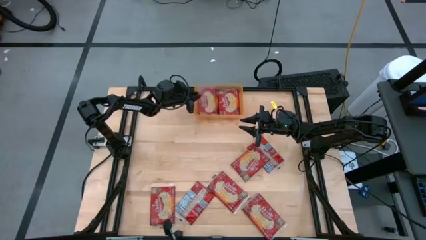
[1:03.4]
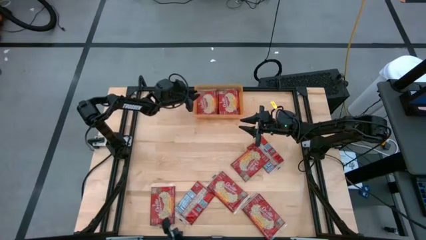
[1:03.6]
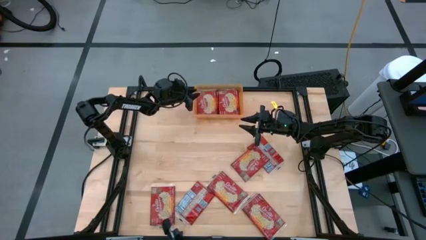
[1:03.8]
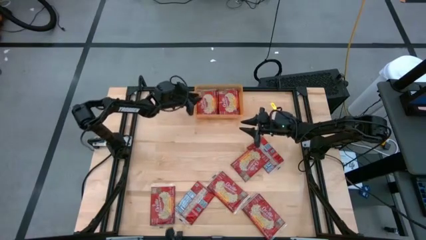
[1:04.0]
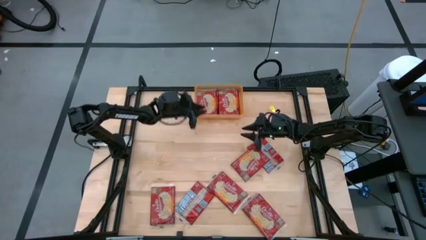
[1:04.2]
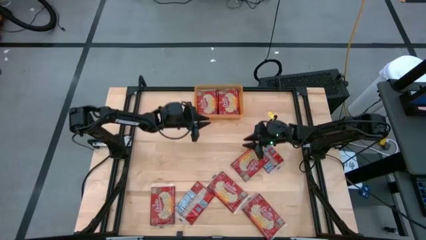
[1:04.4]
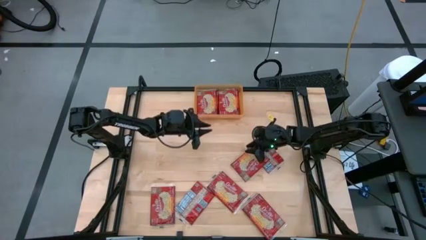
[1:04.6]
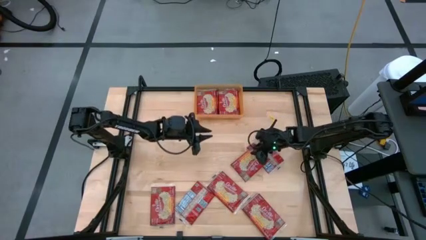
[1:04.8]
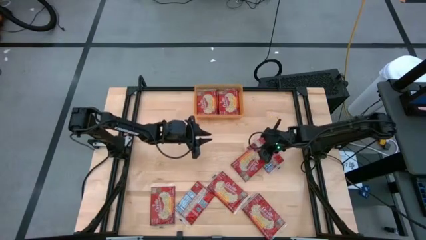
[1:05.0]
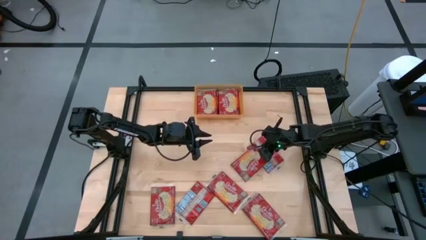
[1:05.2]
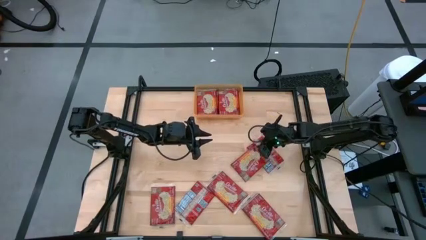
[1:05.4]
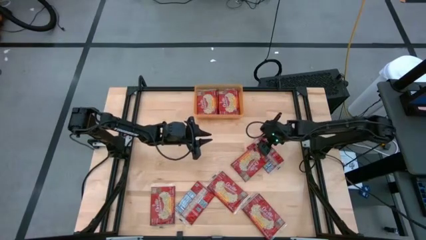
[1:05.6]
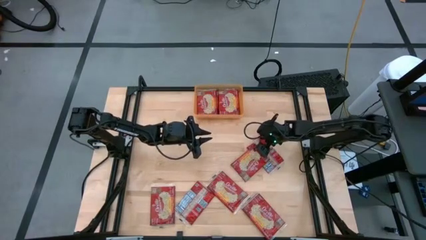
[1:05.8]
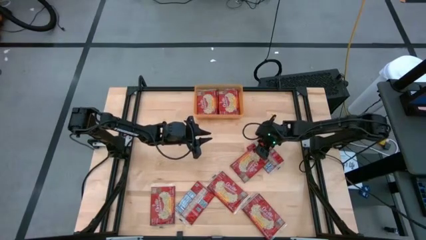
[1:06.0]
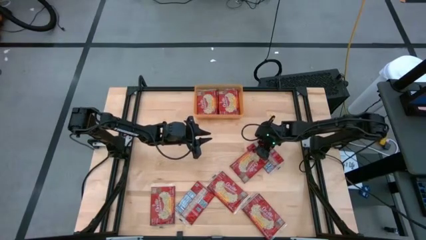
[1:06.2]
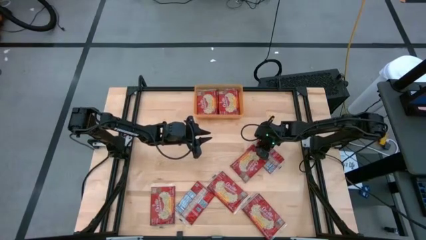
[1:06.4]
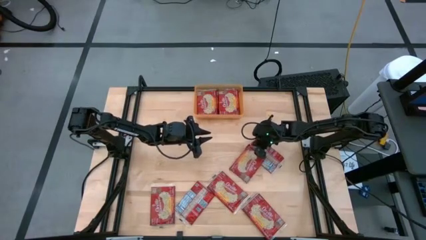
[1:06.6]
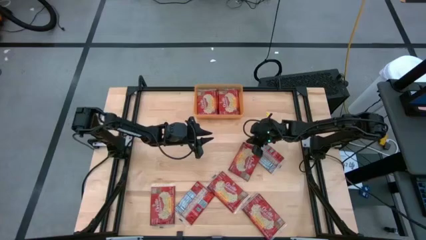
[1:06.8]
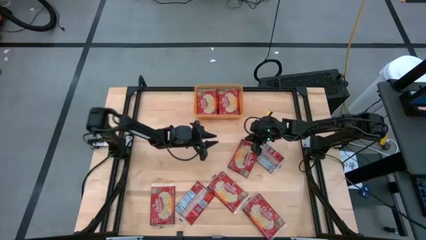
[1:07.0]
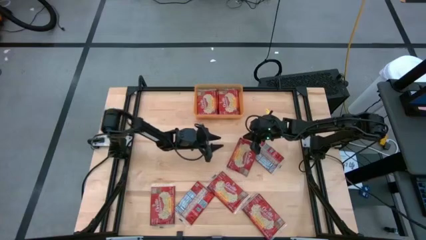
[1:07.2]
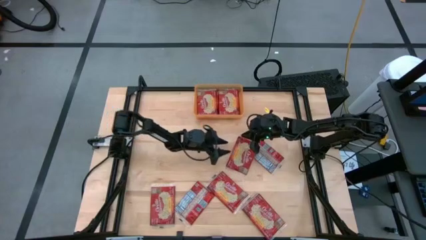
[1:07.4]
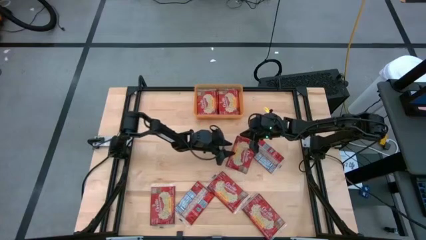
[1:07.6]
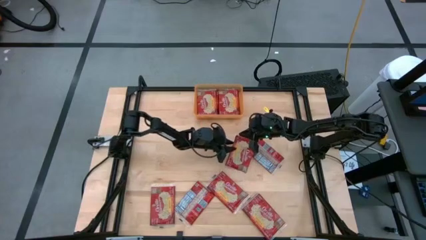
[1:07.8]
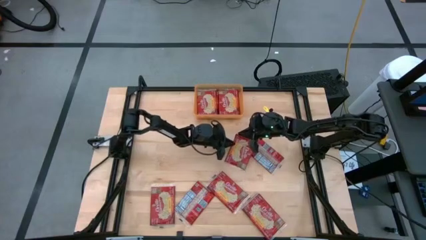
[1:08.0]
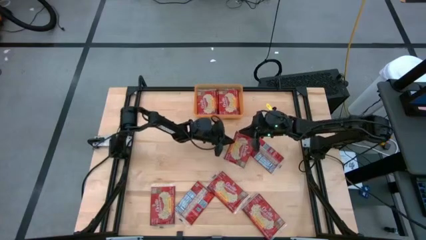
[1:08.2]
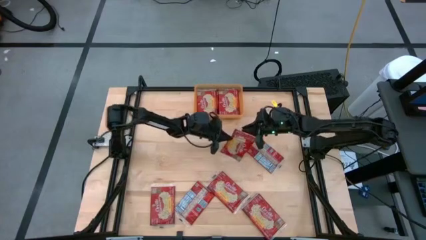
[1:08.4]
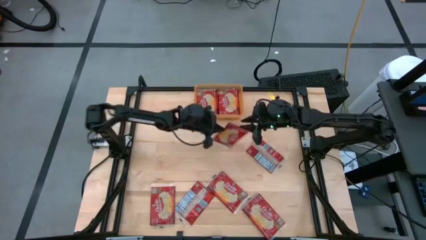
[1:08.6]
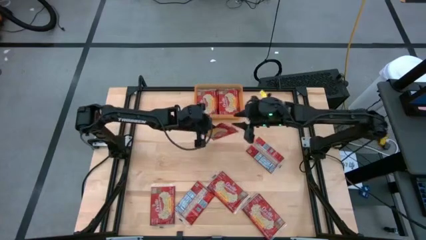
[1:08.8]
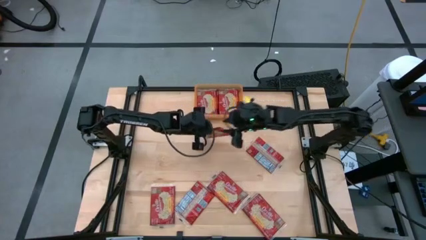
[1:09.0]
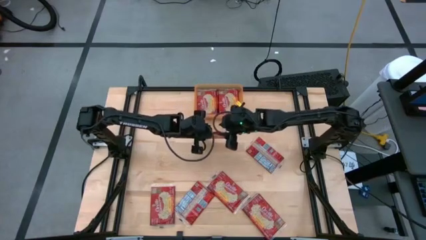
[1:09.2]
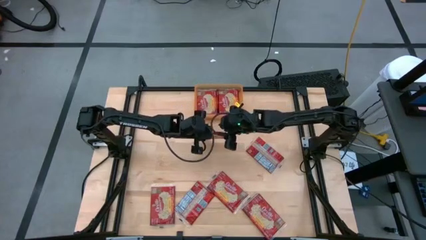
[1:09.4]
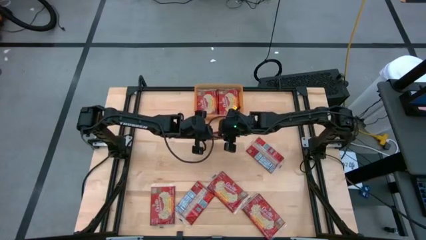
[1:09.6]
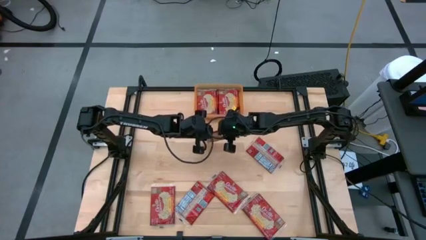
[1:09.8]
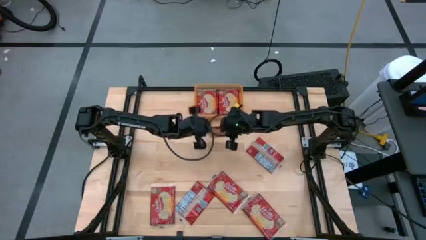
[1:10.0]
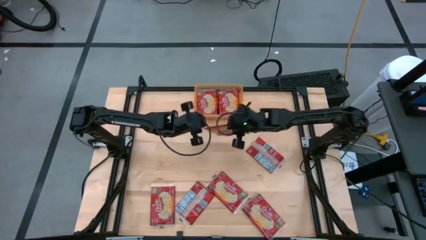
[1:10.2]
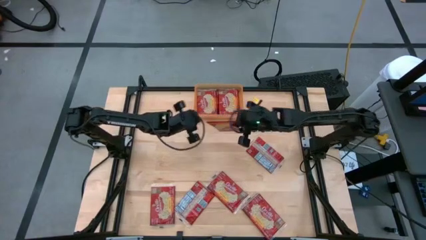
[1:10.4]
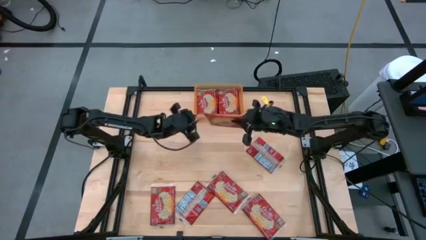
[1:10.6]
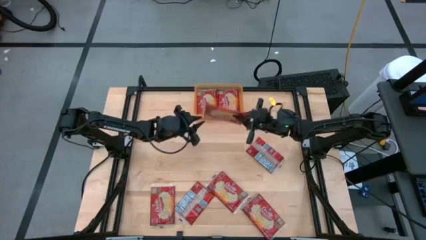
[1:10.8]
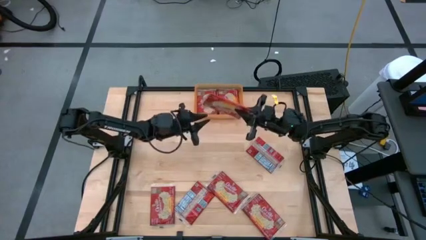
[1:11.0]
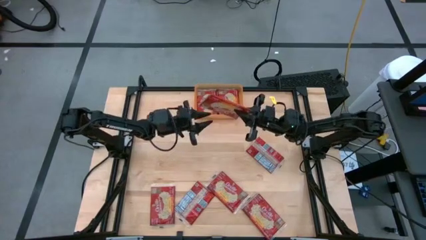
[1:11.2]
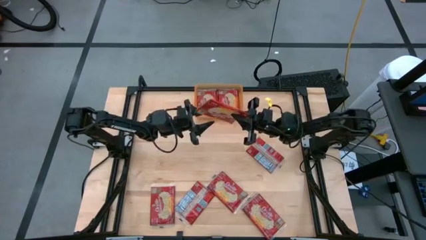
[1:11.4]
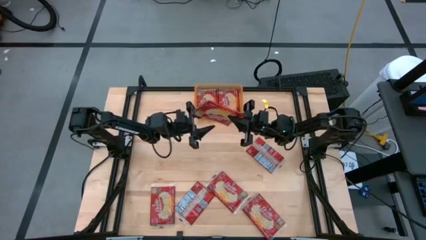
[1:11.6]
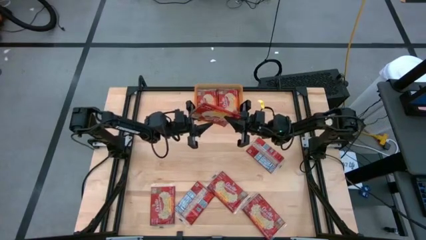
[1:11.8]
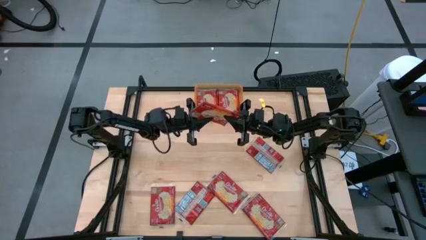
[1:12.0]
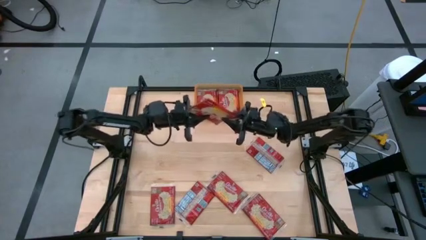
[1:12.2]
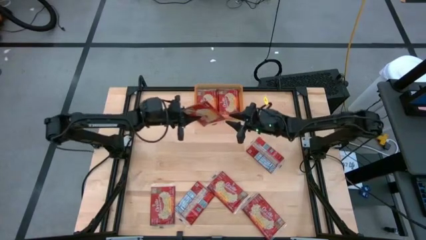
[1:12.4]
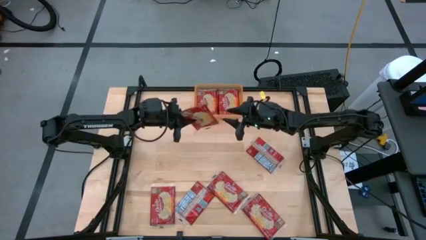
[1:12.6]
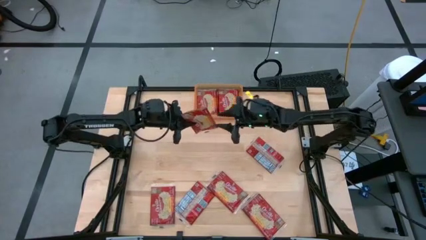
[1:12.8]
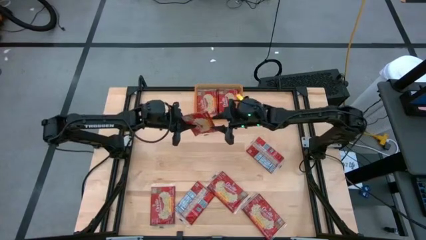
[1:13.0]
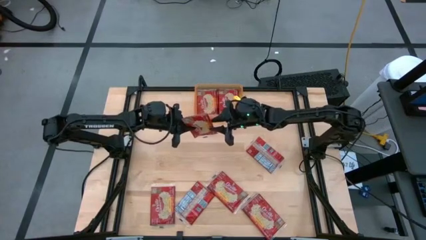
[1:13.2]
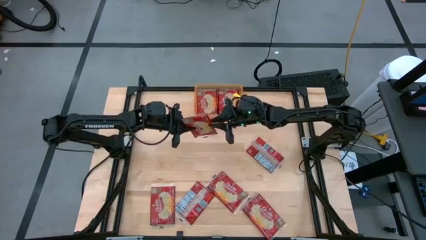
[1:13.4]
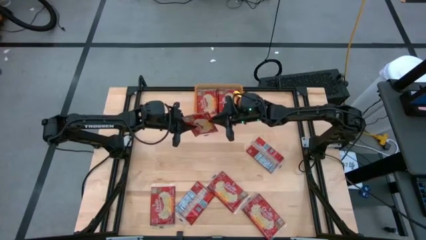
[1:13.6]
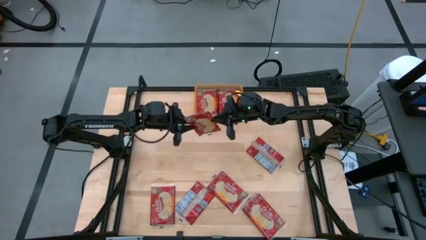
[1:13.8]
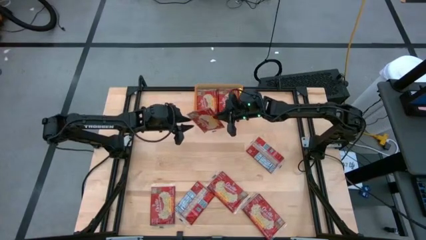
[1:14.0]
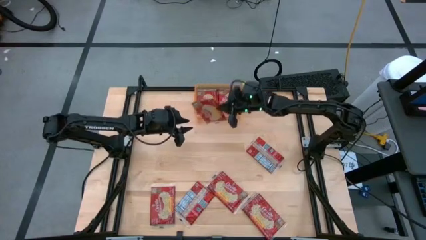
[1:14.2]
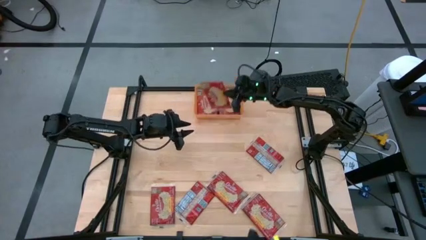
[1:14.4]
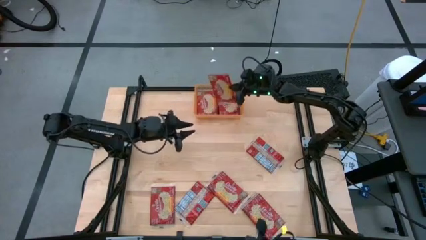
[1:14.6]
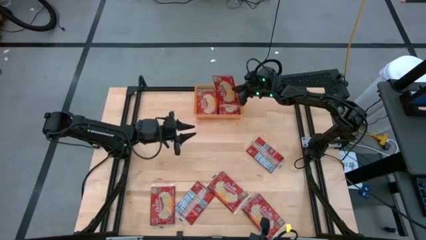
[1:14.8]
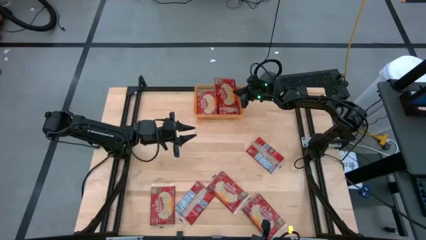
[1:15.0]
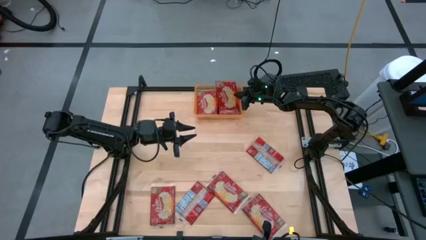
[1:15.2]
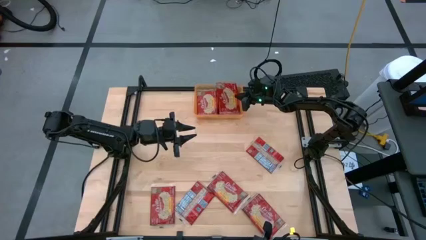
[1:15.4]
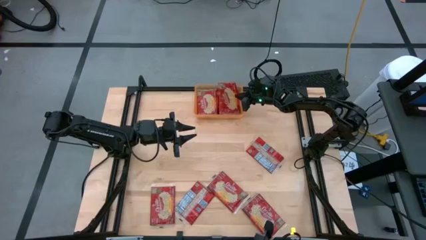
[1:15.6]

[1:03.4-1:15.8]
Task: Sort popcorn bags into baskets
Put the popcorn pack into the orange bin

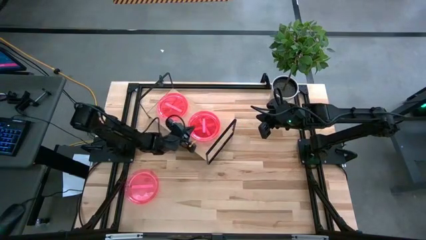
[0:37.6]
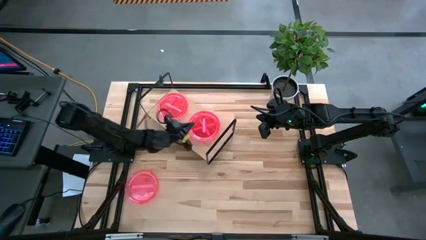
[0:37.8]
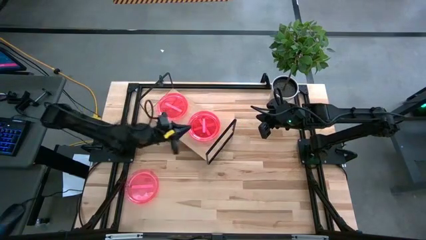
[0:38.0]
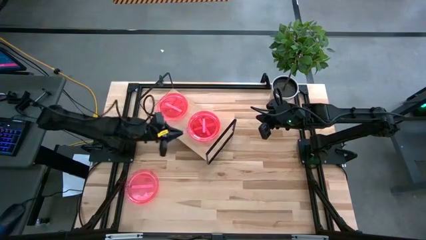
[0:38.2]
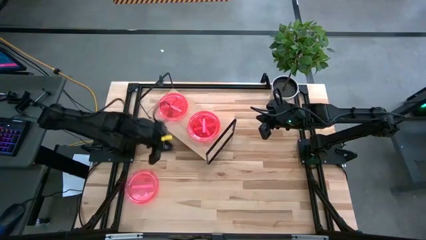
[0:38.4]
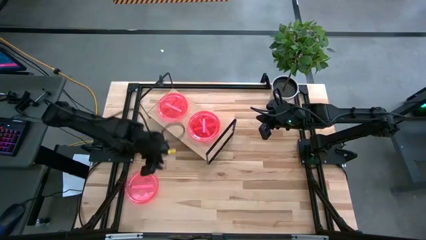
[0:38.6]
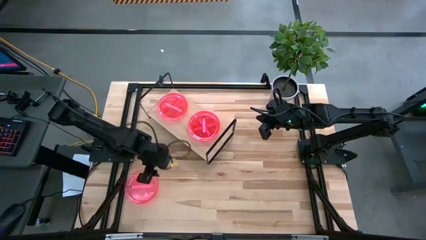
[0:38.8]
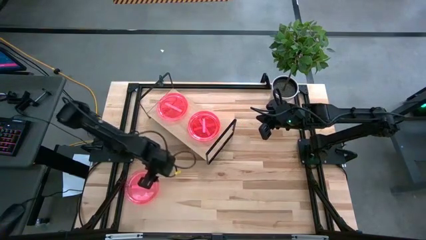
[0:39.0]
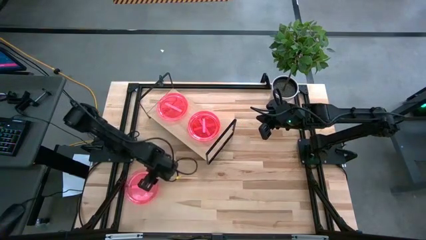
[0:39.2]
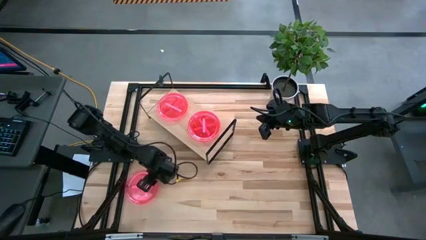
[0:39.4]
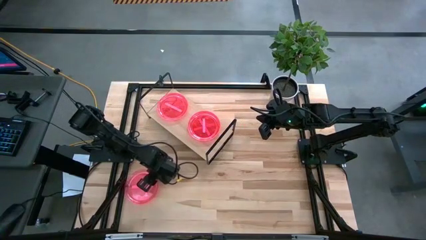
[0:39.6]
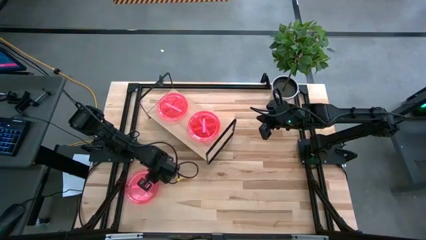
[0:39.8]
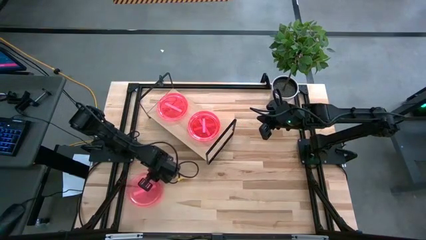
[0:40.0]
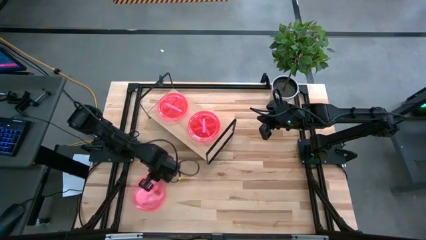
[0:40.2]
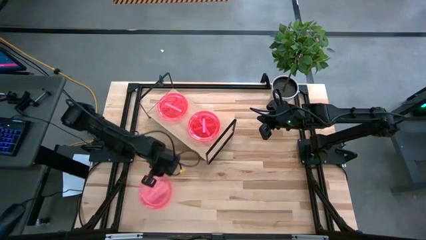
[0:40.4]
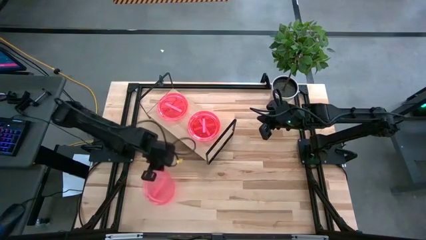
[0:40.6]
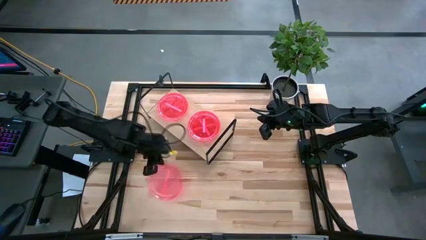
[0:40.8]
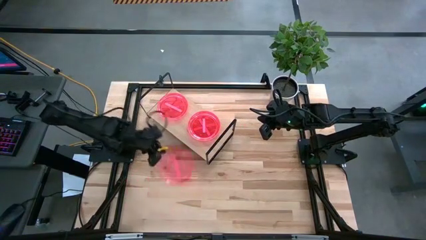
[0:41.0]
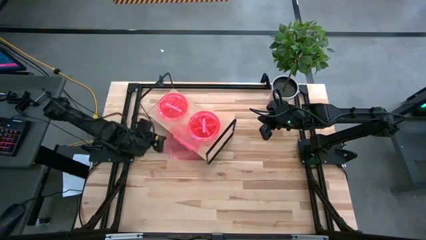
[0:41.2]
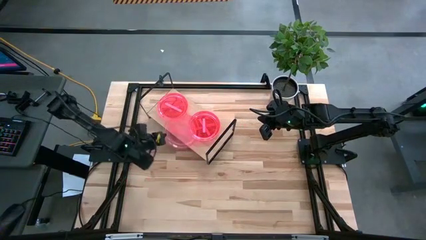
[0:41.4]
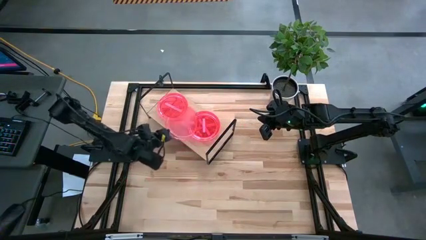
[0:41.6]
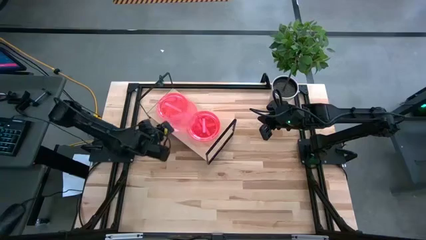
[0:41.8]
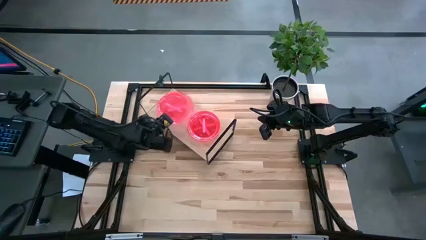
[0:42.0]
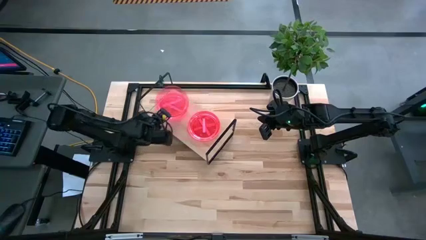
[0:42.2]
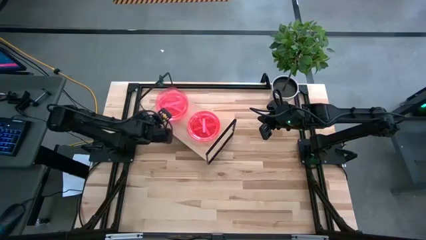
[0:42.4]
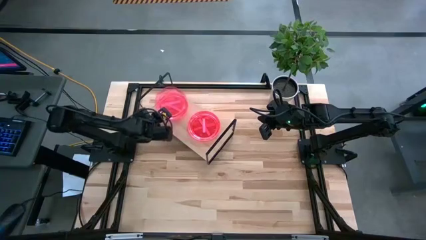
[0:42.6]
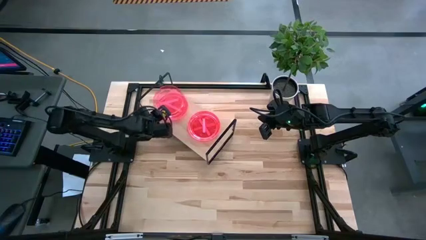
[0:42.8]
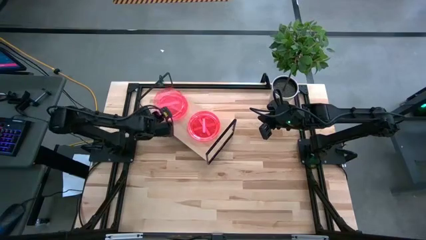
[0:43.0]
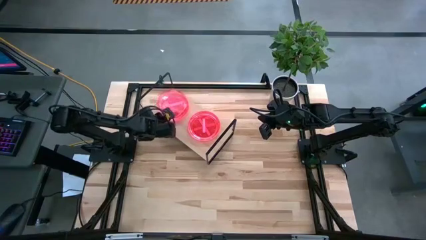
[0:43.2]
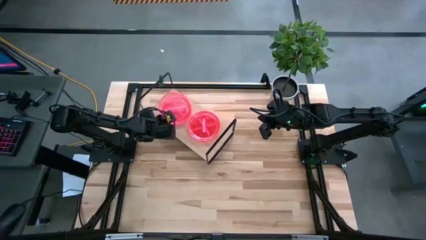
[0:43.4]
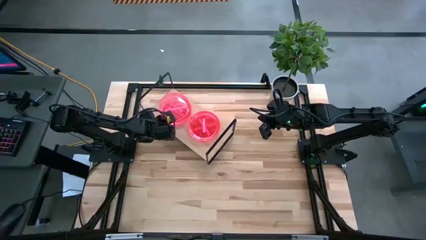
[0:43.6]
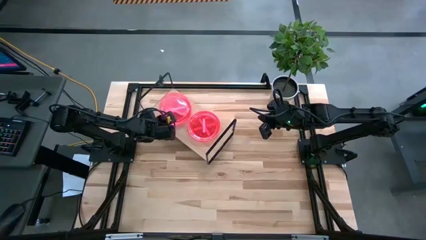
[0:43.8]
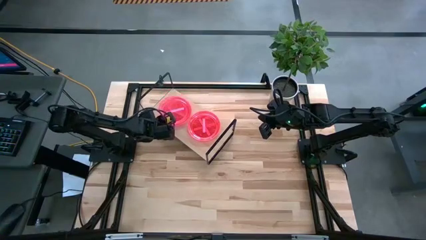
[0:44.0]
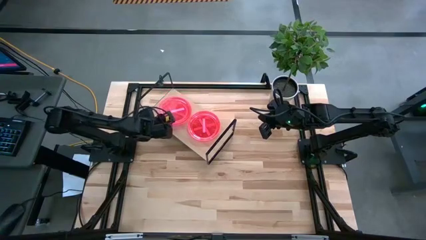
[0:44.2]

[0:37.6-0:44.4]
Task: Place and stack plates onto a shelf
Stack the pink plate on top of the left pink plate on the shelf
